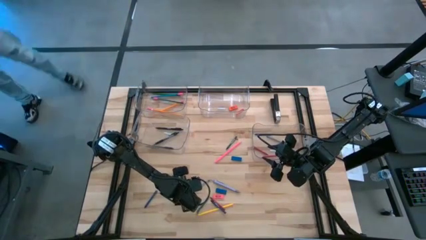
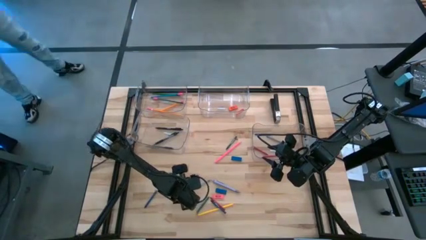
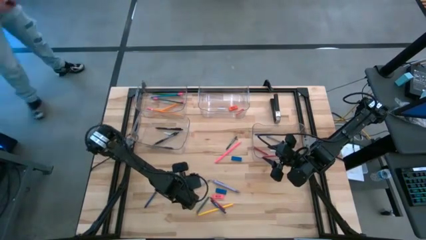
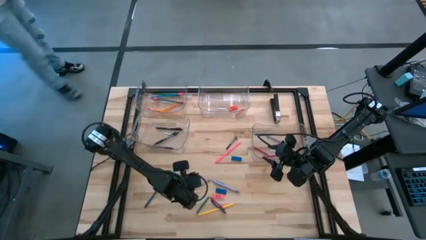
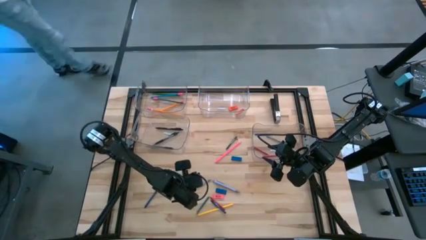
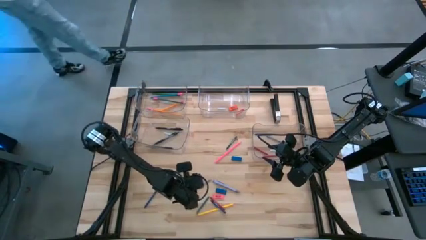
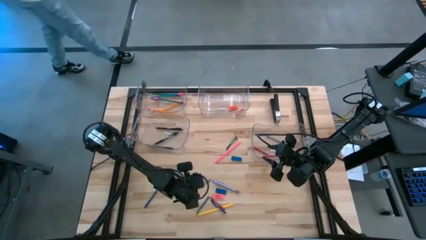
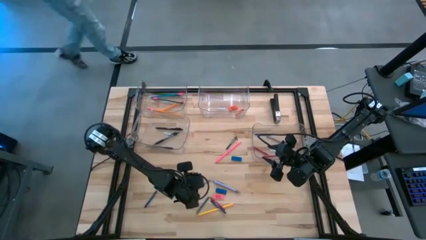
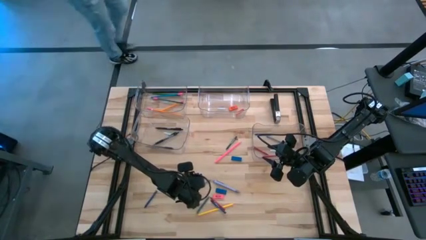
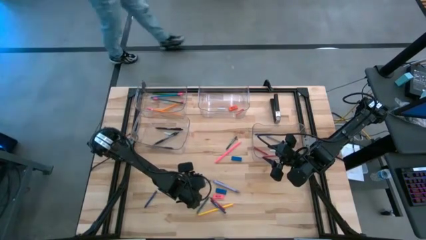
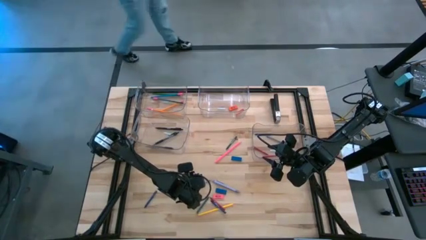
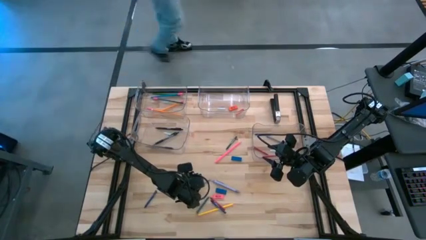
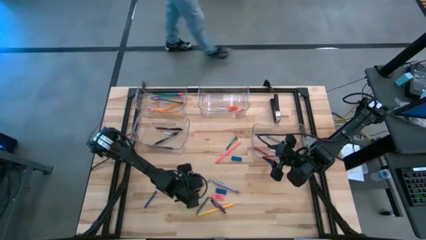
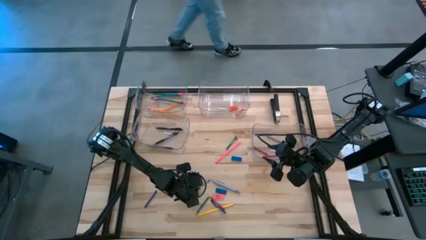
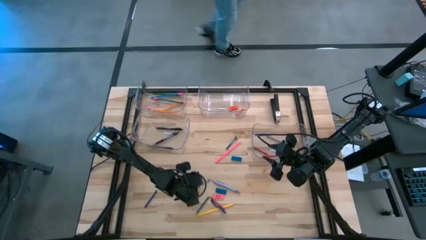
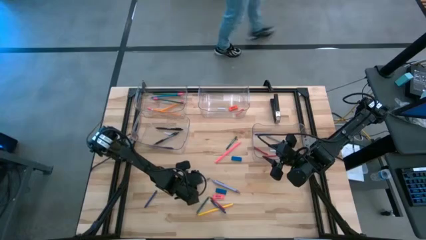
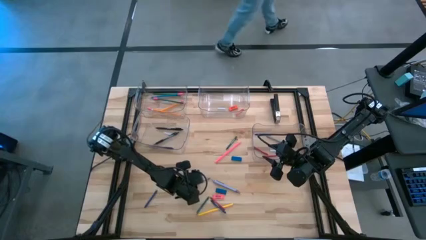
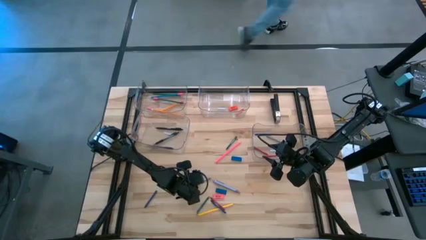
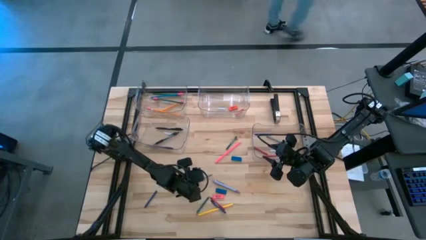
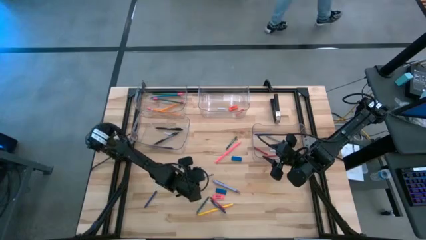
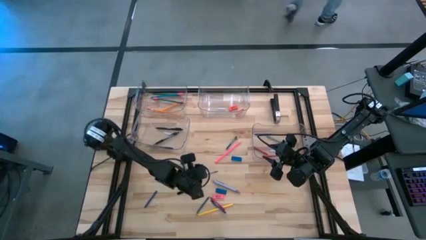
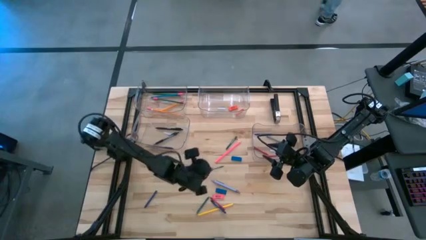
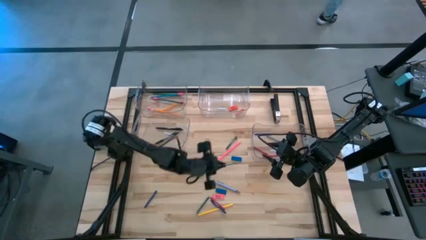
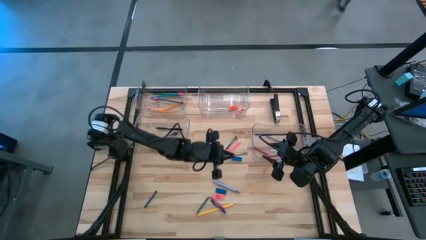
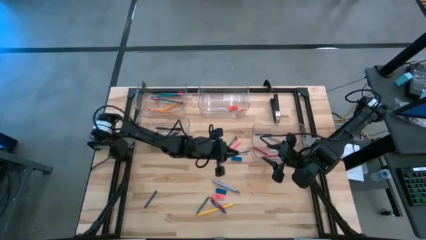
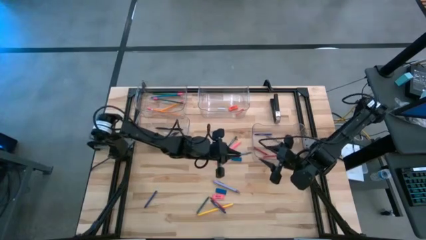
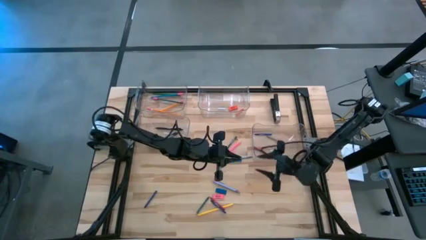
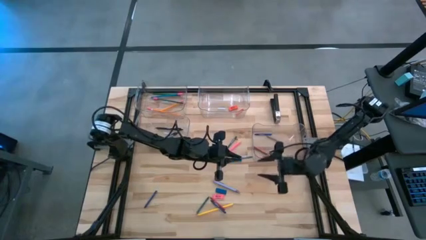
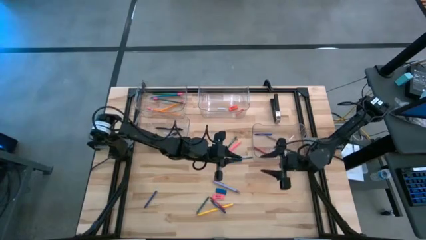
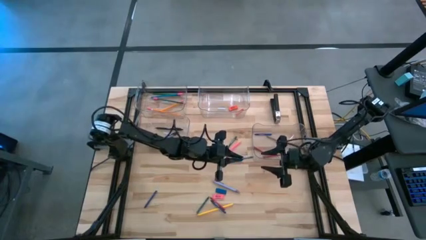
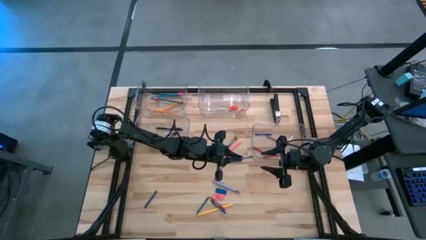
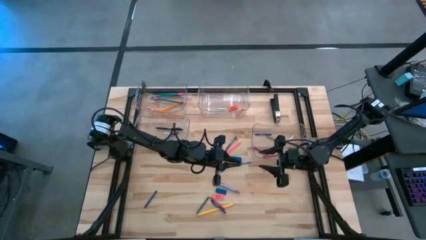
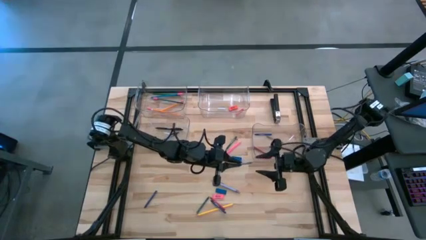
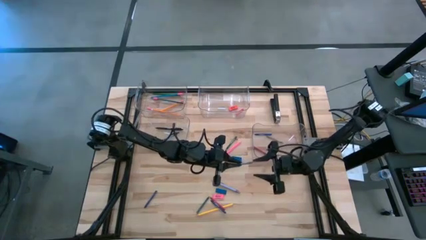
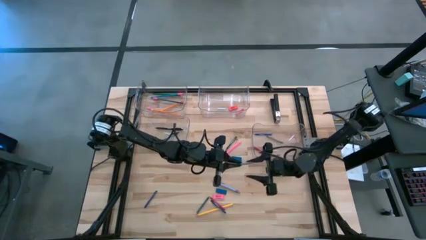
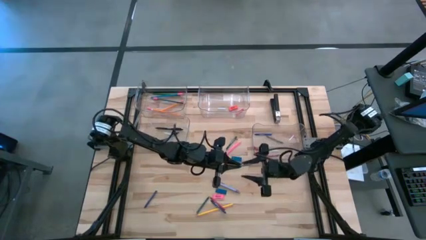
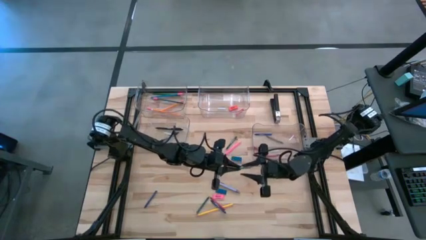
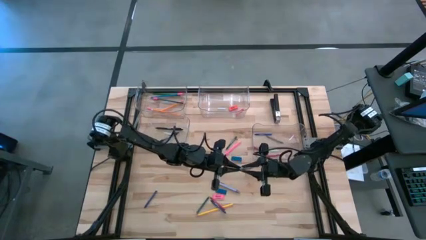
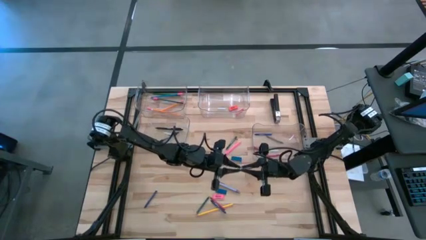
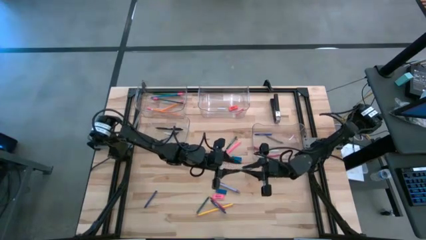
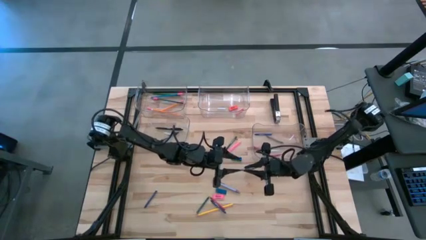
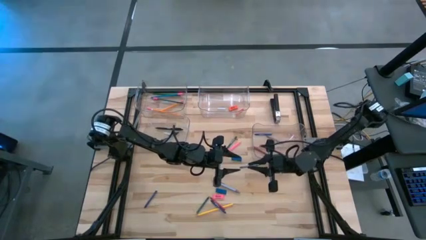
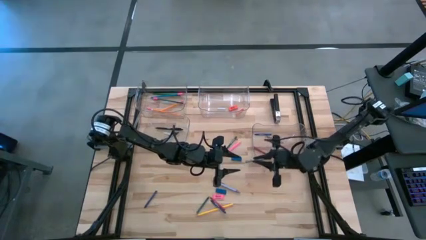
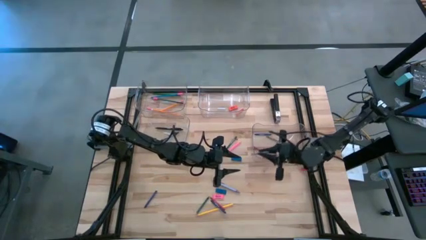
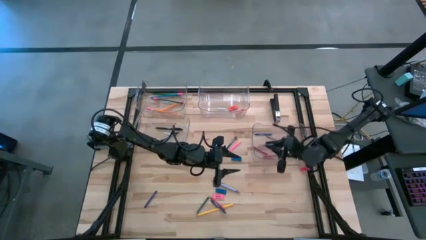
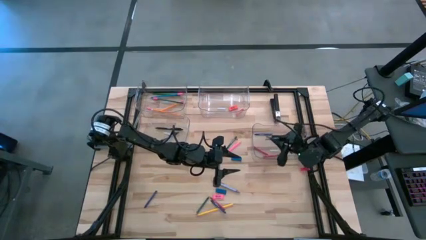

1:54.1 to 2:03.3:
Task: Sort crayons/erasers/pens/pencils in bins
Put the gray crayon into the bottom right transparent bin

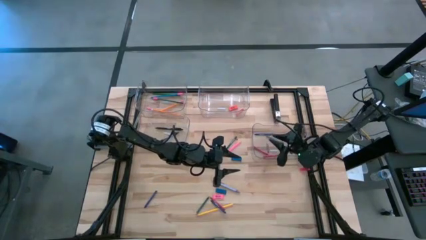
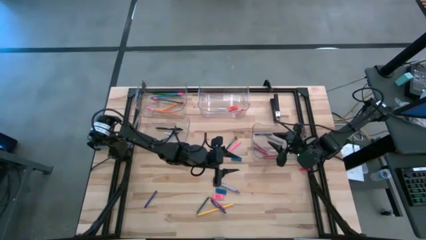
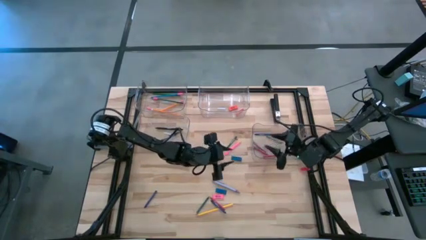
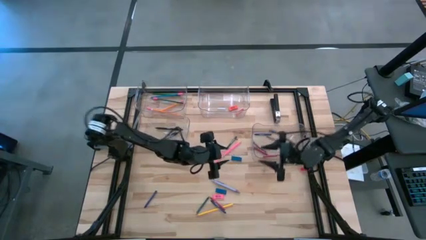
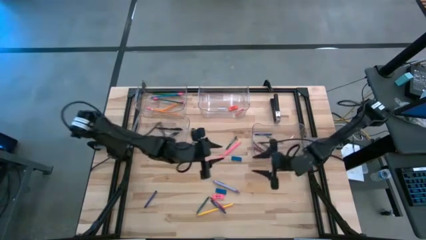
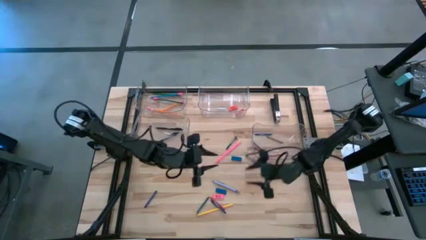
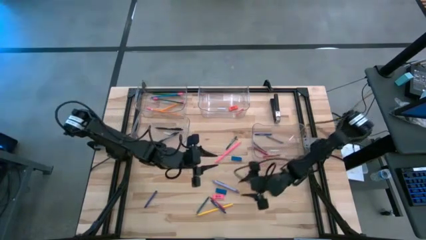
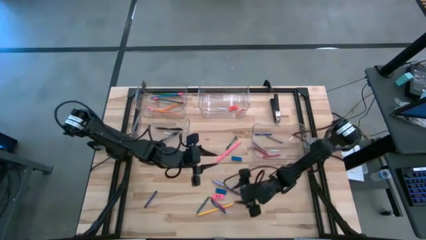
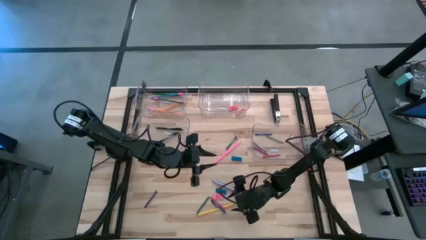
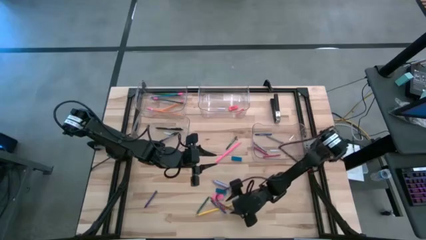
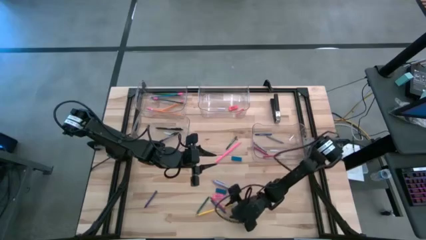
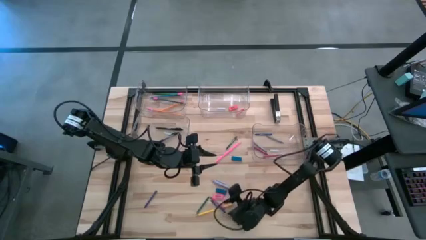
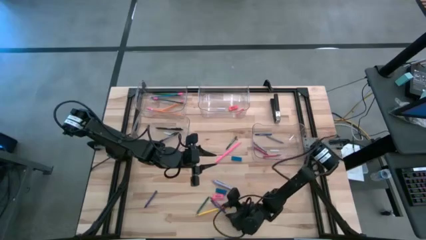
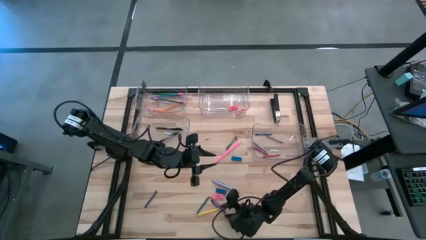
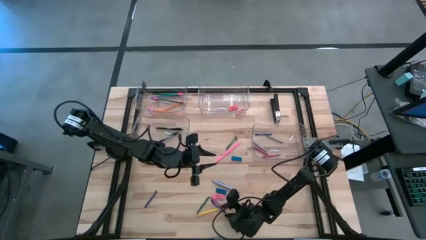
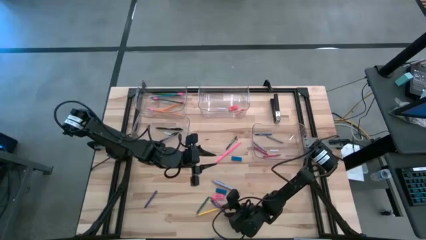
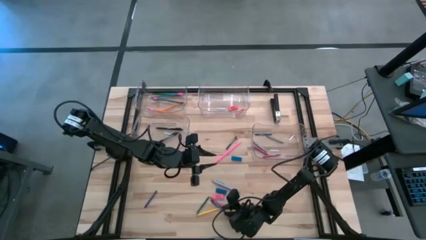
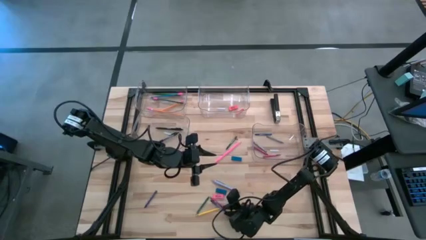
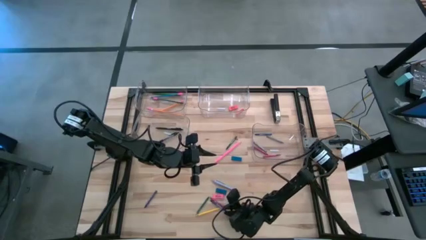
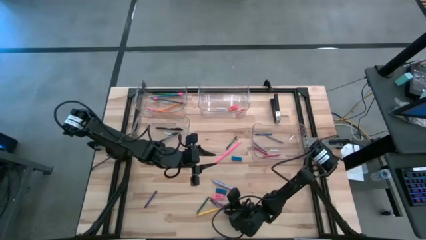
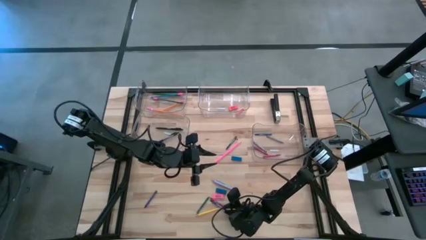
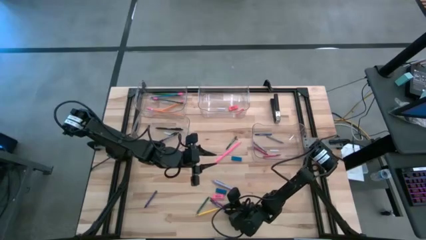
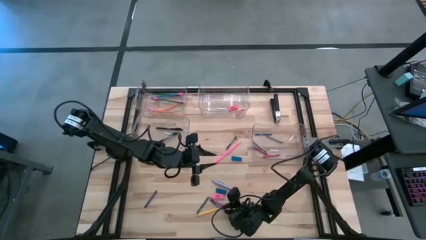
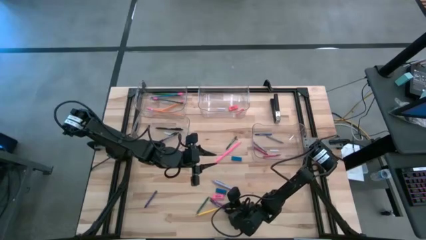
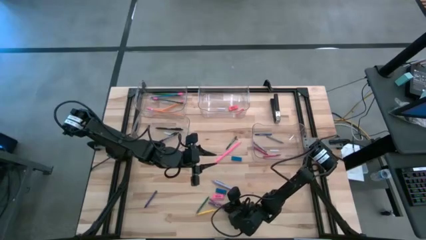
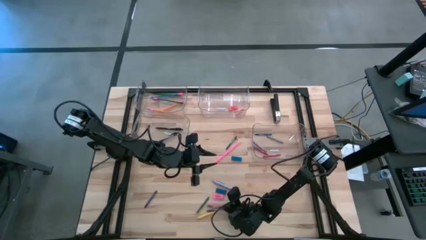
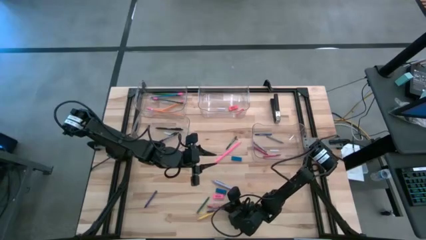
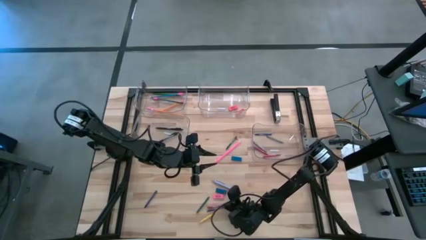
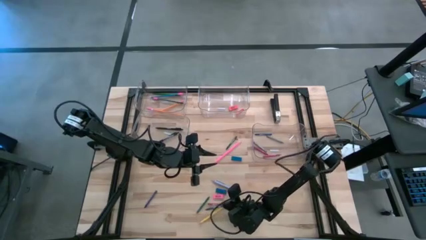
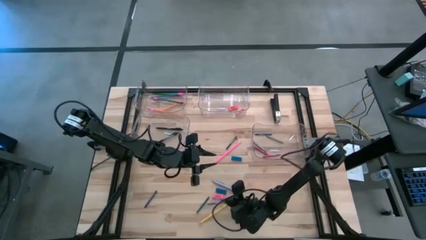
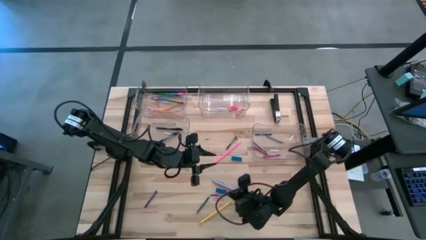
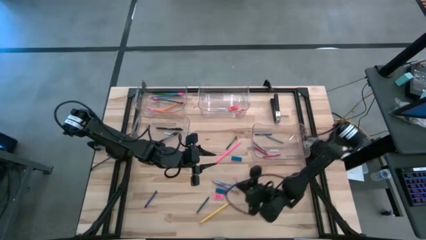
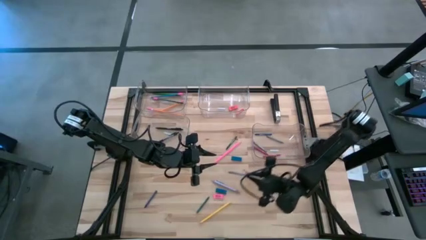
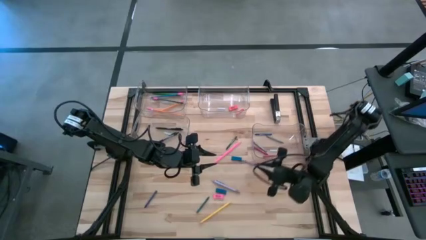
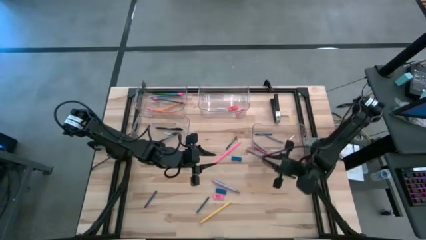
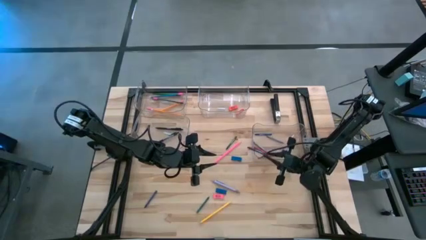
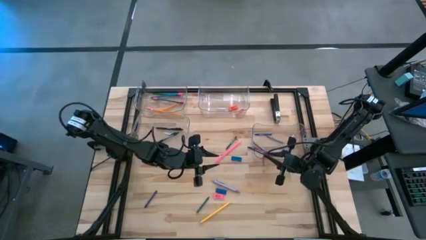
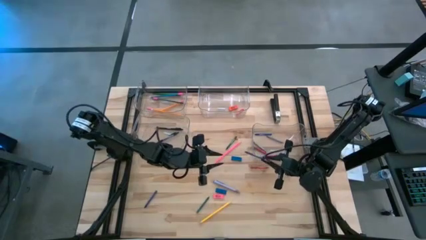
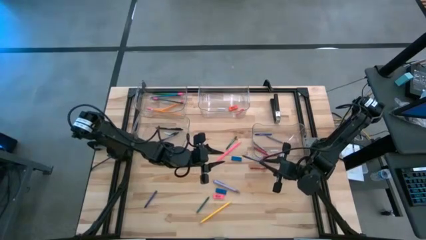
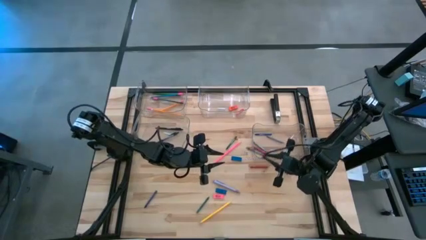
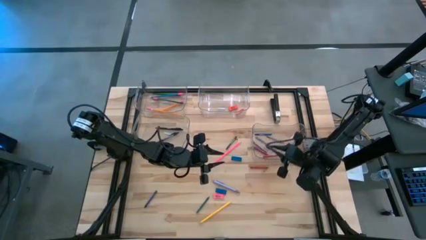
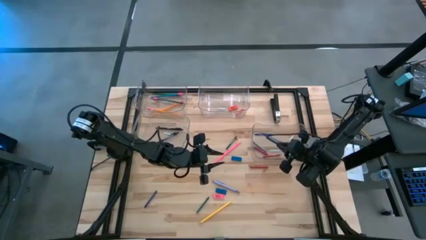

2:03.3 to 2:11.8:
Put the blue crayon into the bottom right transparent bin
